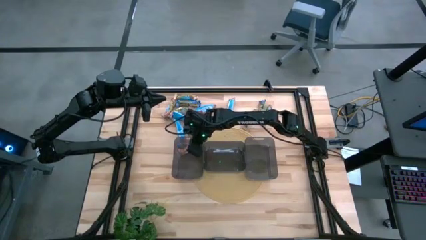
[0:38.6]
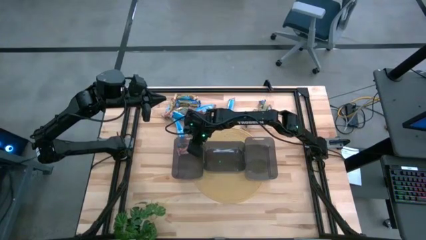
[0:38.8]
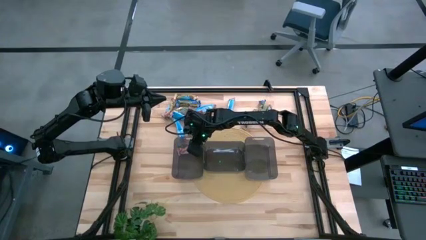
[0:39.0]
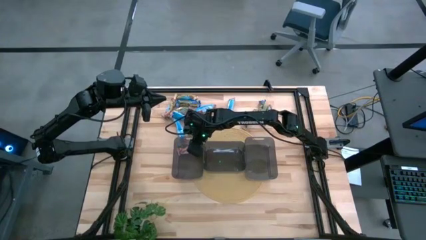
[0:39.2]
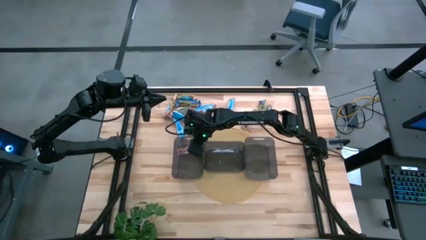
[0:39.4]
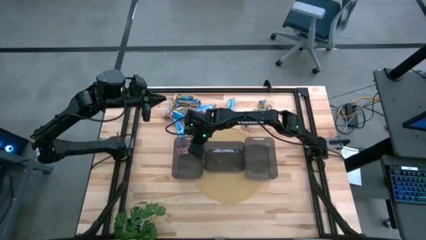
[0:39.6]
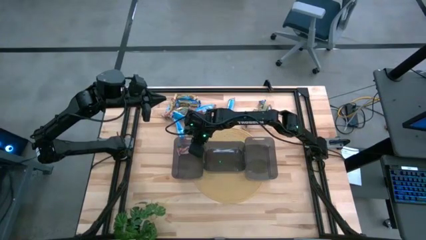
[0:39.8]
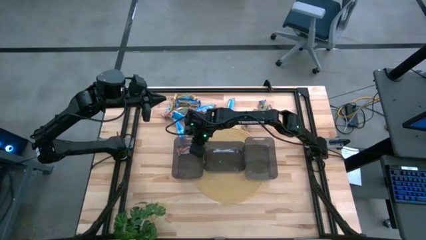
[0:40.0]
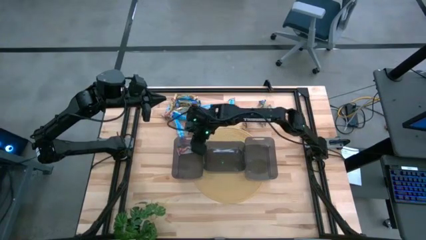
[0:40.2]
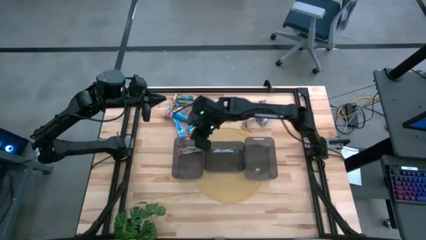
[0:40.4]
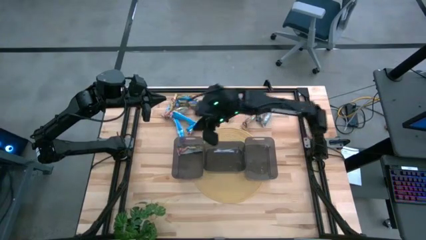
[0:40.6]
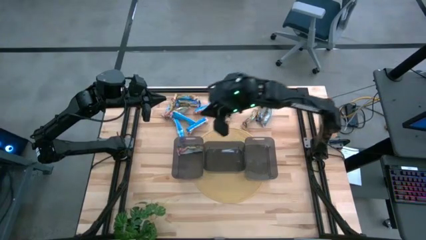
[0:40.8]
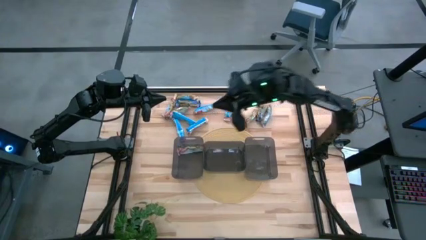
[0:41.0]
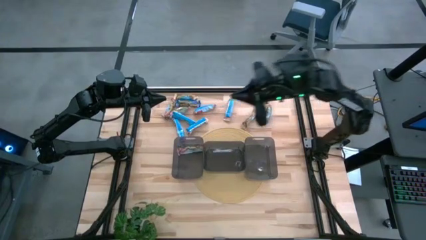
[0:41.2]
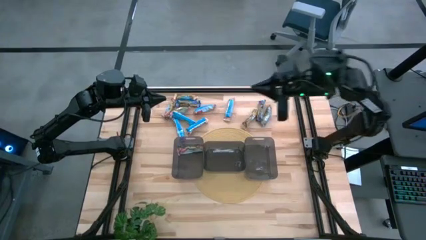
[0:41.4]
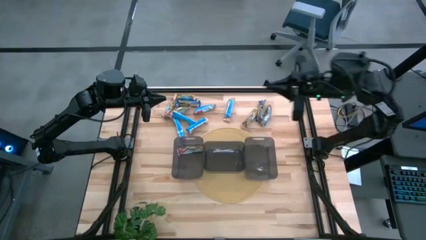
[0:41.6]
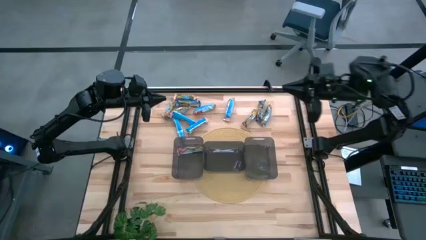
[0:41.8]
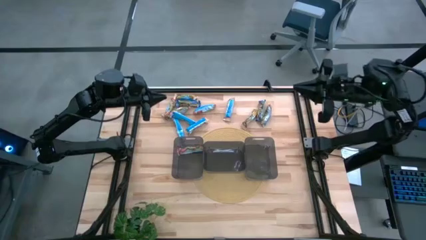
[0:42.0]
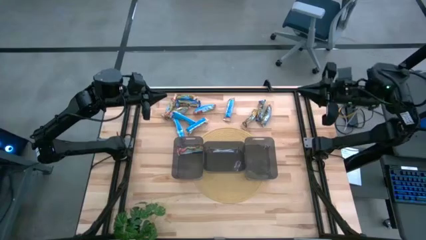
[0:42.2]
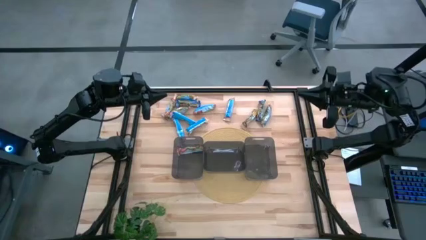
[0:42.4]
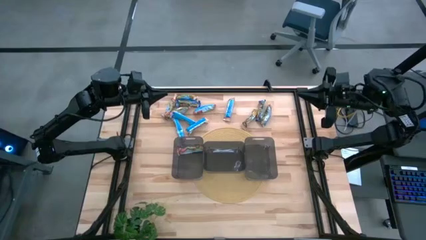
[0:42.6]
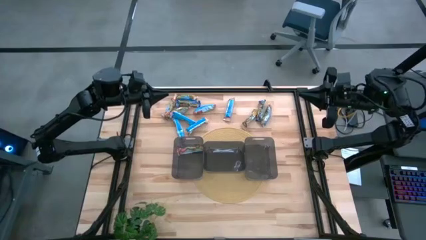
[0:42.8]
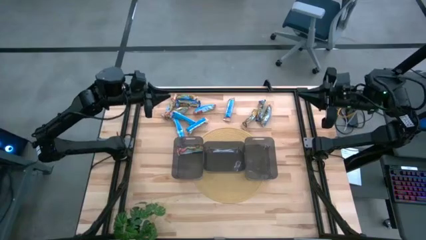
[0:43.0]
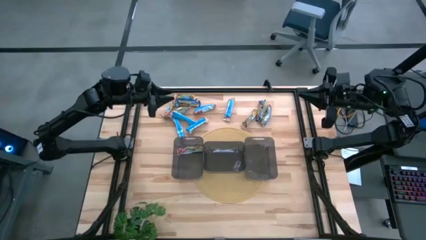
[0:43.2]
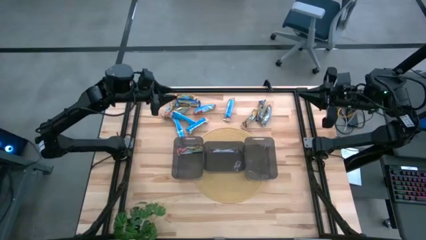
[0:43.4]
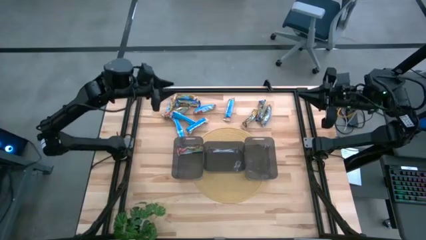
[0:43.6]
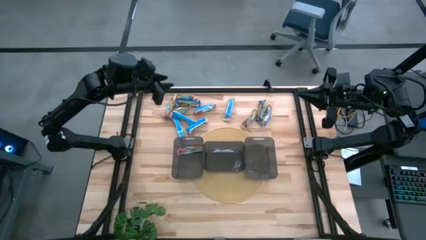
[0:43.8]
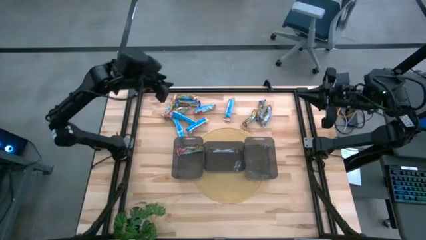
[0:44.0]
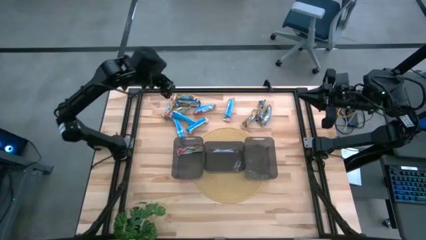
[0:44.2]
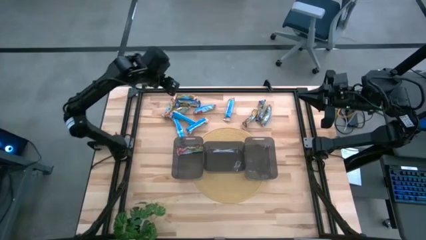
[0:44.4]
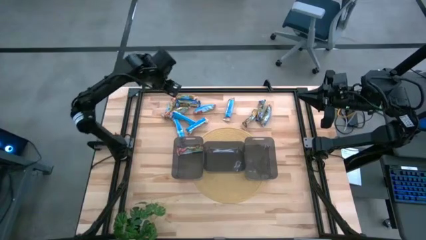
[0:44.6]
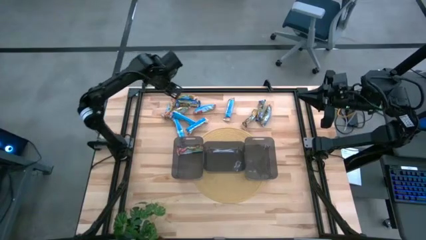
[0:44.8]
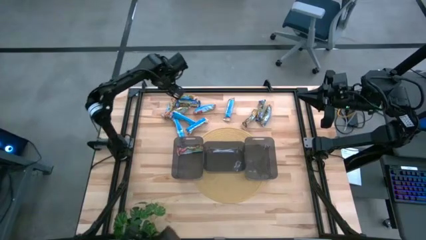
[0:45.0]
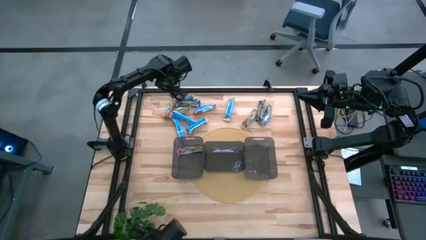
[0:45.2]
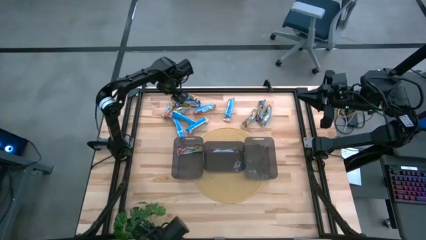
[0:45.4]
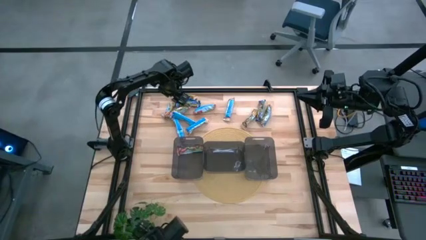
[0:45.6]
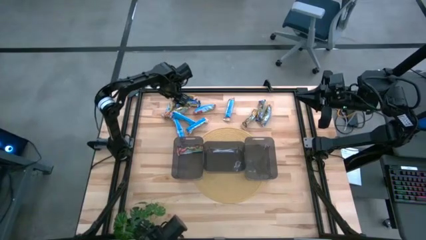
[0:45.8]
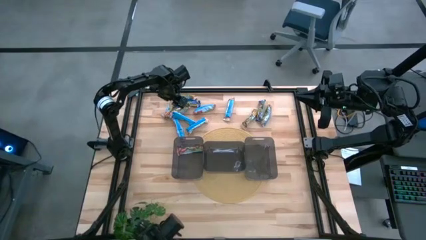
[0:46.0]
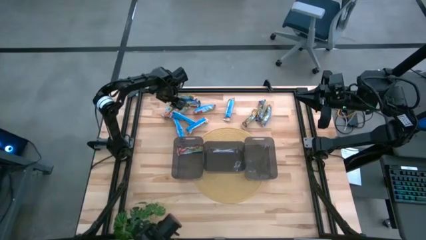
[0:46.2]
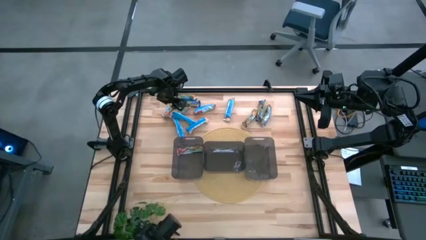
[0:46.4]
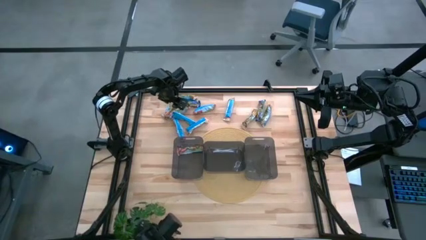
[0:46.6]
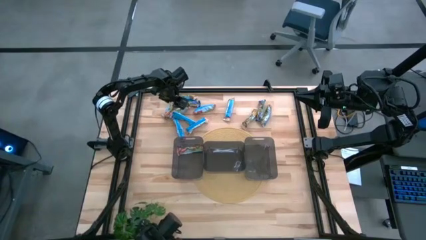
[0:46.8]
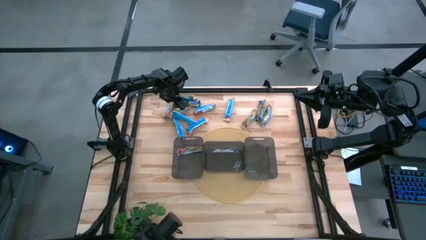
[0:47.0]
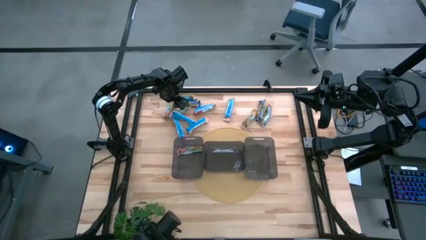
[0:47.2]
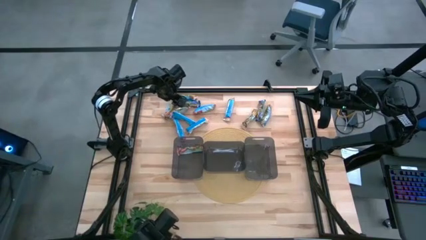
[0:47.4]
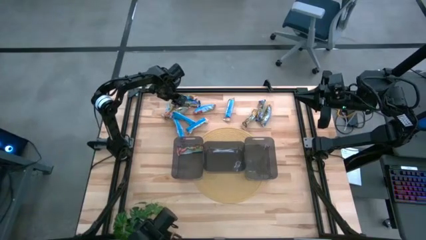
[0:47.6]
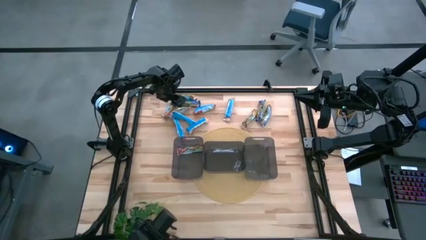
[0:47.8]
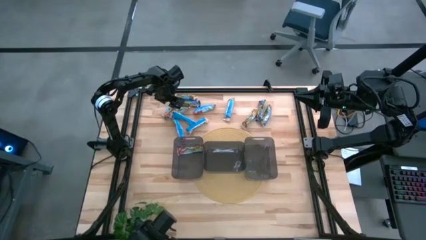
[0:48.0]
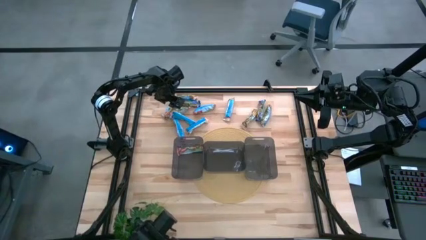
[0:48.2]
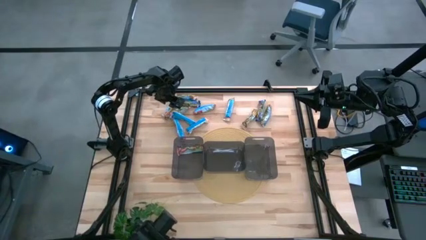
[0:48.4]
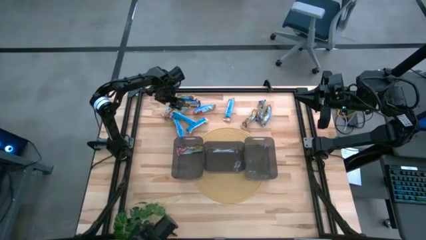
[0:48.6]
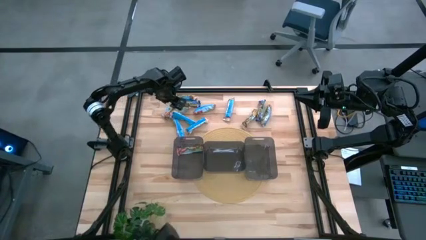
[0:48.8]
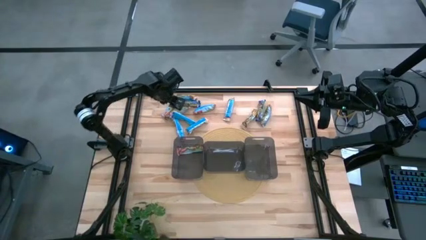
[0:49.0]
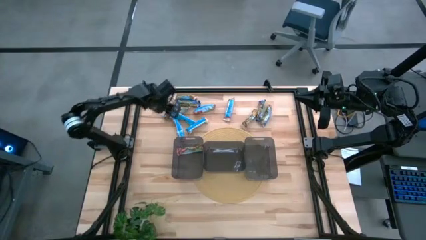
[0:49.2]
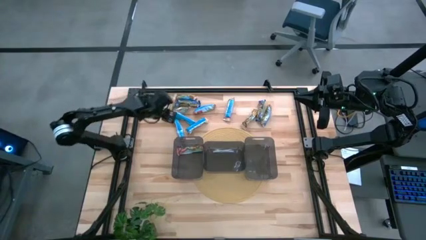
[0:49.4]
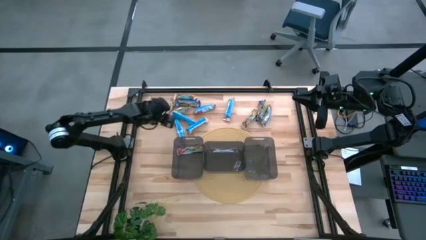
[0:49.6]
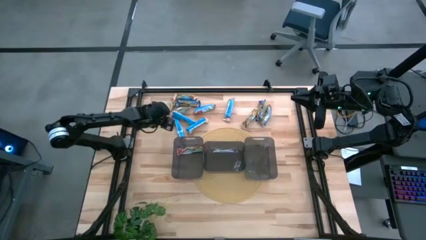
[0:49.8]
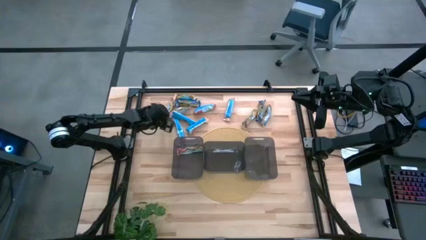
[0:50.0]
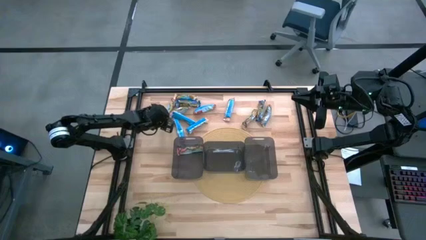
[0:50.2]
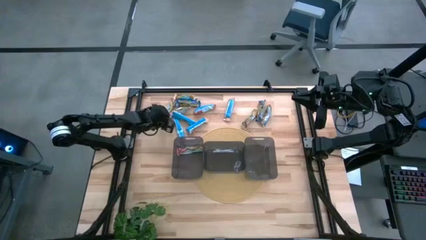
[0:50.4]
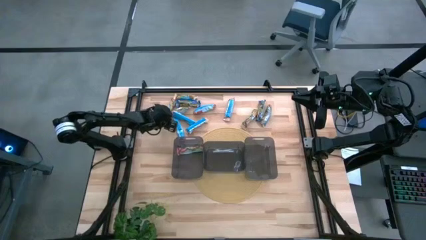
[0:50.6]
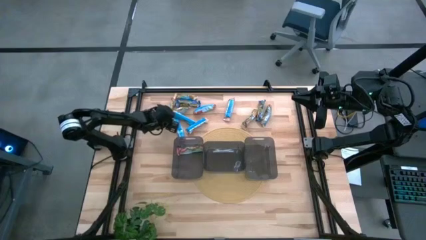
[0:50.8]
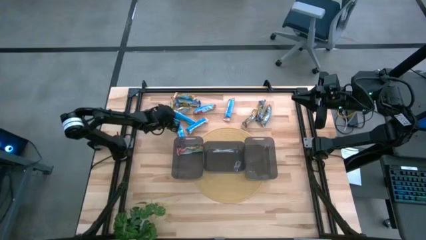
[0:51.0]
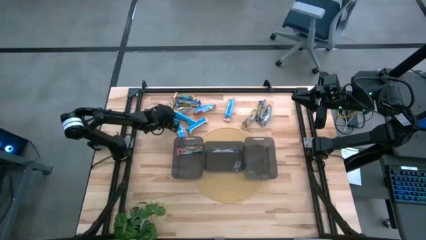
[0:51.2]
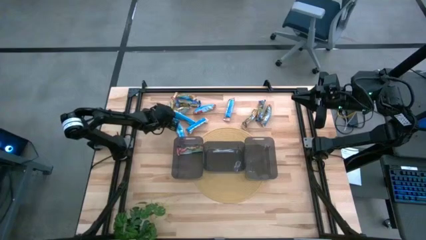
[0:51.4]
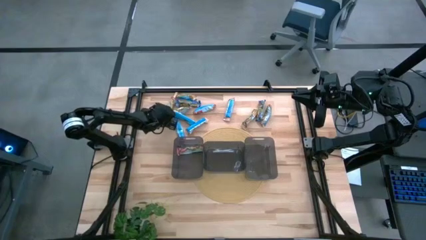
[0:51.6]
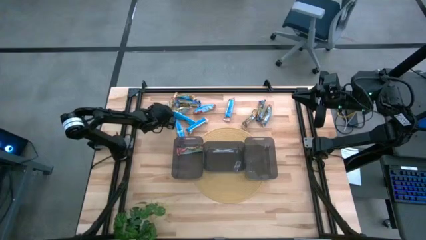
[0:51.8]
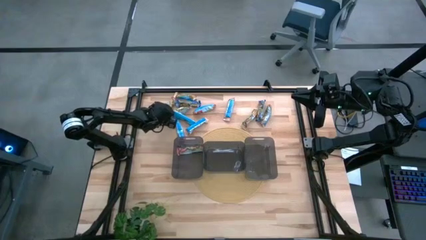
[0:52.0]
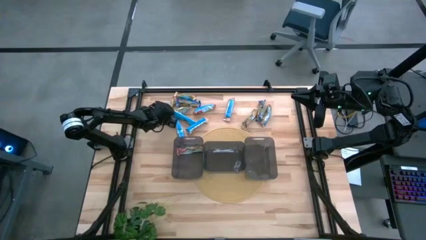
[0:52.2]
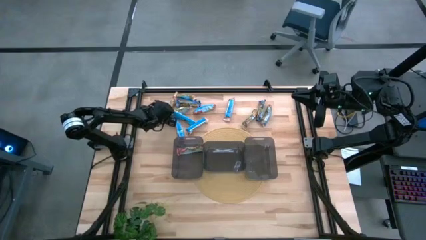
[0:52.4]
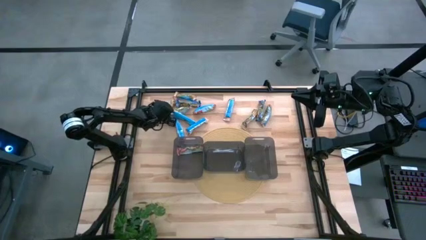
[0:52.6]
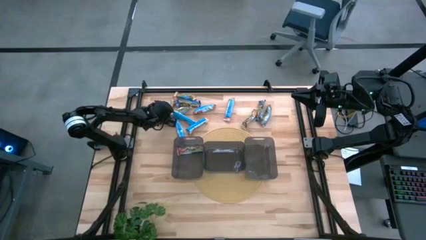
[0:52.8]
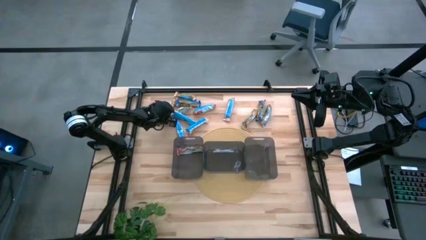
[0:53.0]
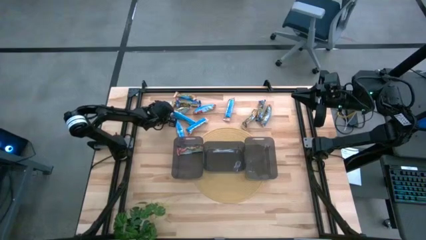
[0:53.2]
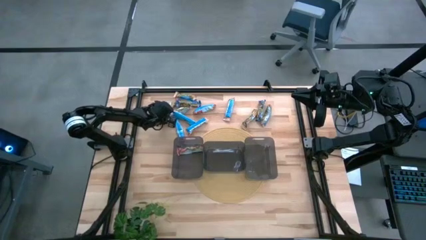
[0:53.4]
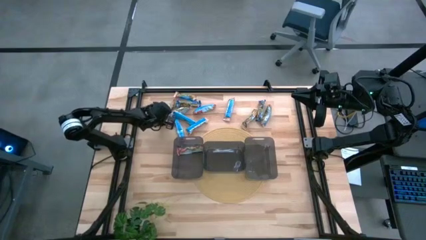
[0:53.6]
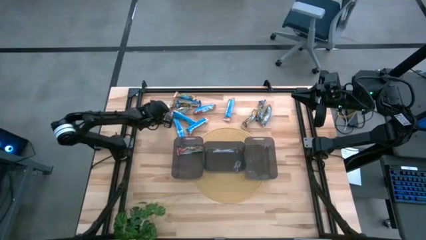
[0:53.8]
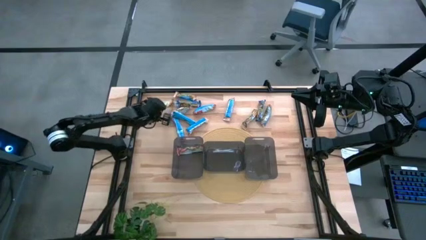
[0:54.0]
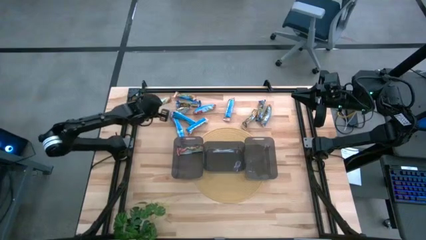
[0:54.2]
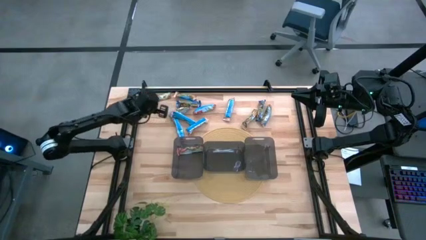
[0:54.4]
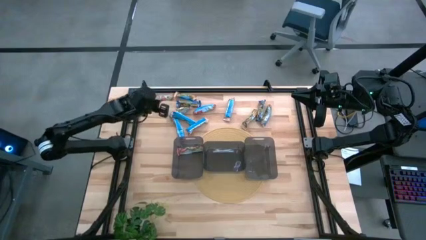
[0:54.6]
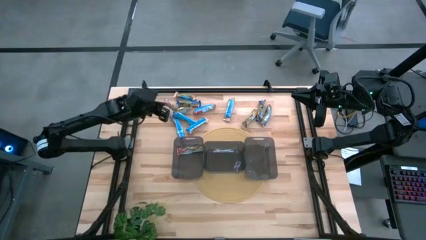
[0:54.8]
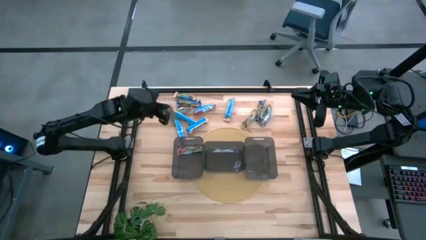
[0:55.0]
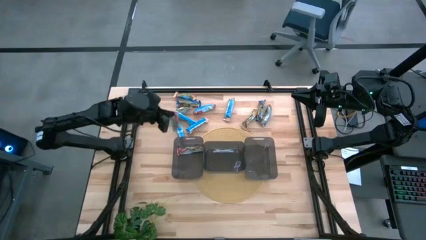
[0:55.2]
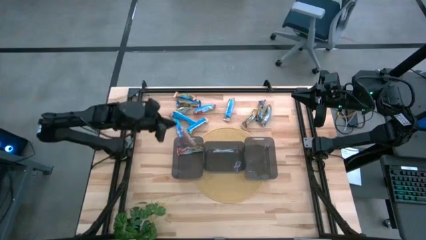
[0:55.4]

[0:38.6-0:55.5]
Task: Pick and place Granola Bars by type
Put the red granola bar into the left black bin
